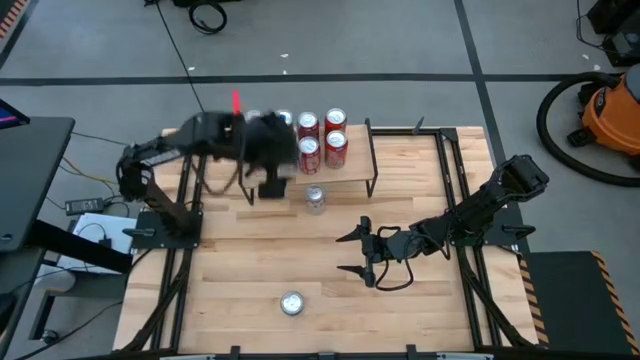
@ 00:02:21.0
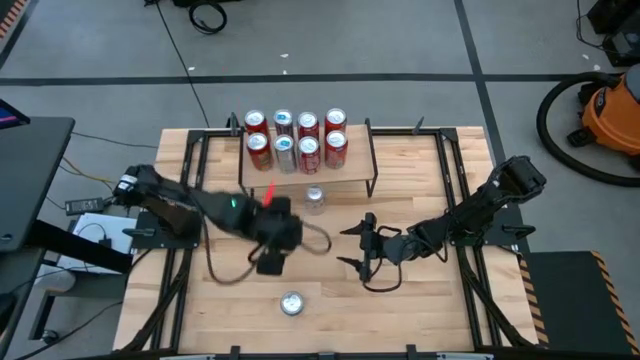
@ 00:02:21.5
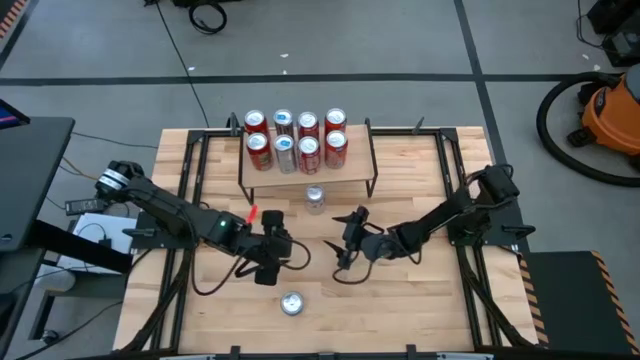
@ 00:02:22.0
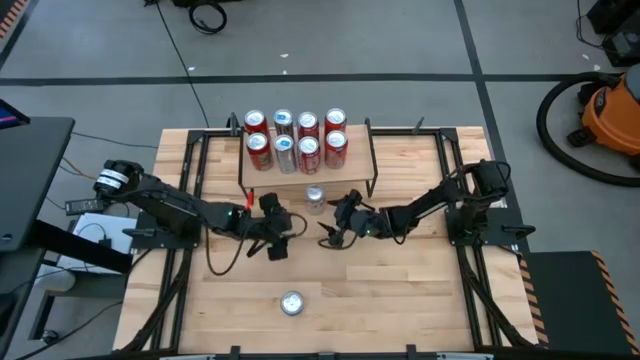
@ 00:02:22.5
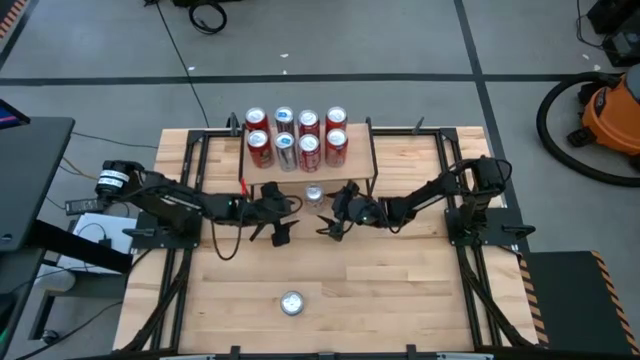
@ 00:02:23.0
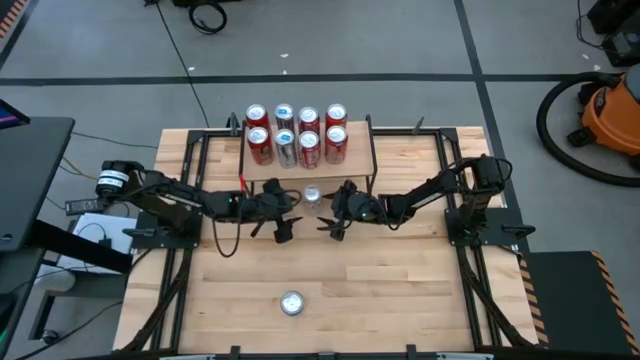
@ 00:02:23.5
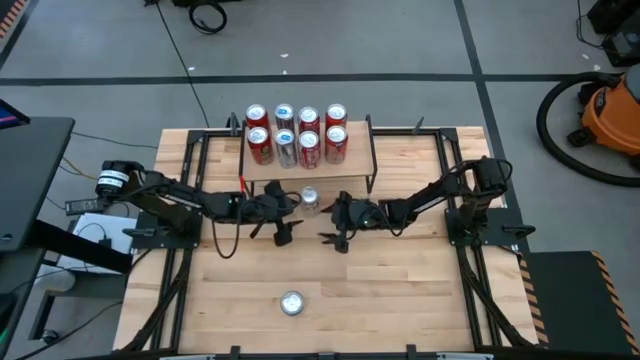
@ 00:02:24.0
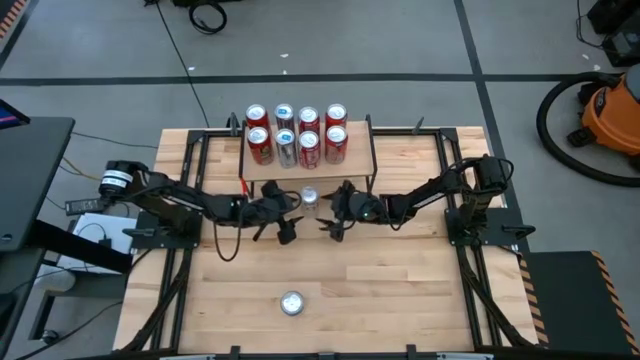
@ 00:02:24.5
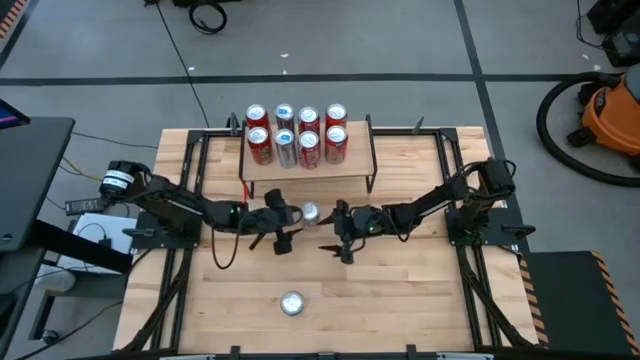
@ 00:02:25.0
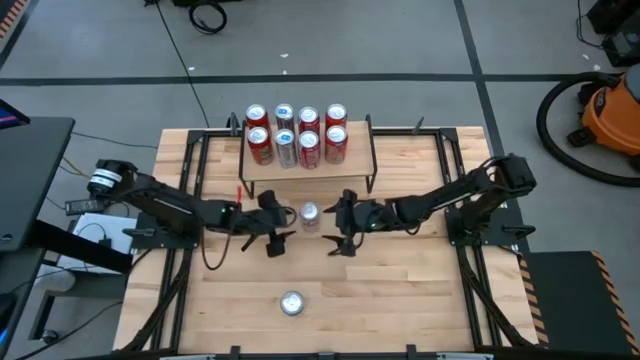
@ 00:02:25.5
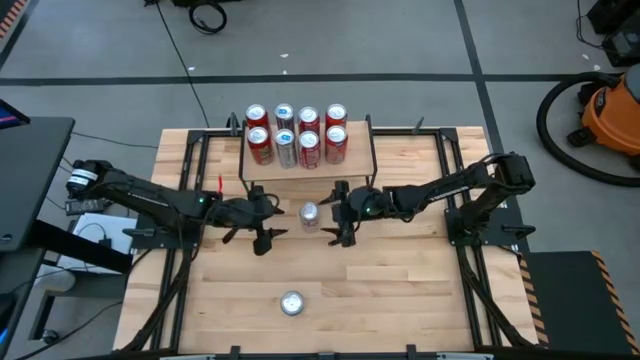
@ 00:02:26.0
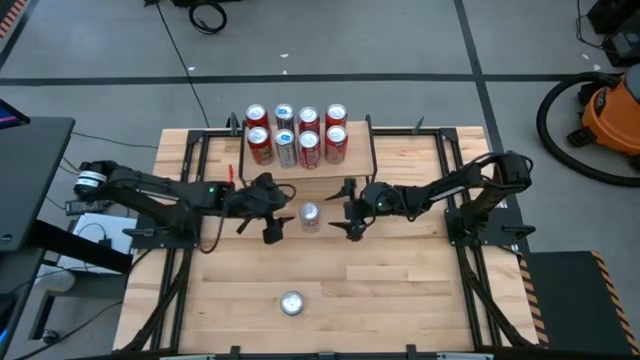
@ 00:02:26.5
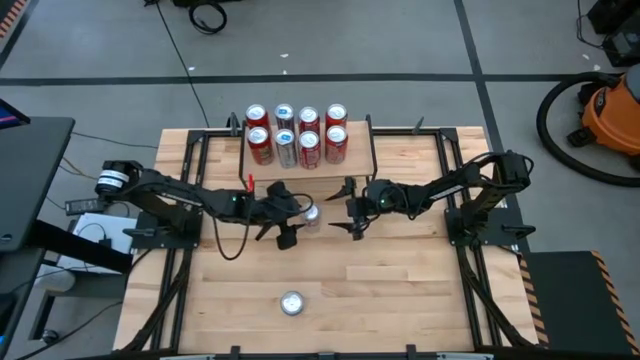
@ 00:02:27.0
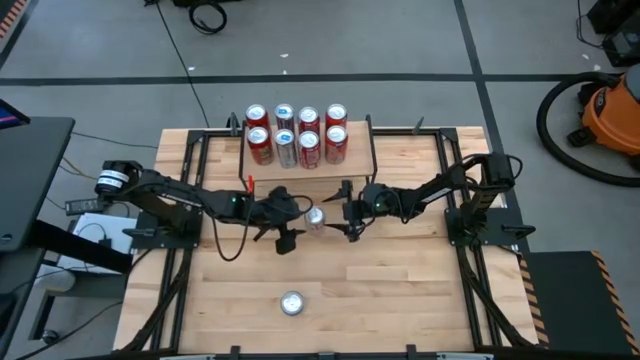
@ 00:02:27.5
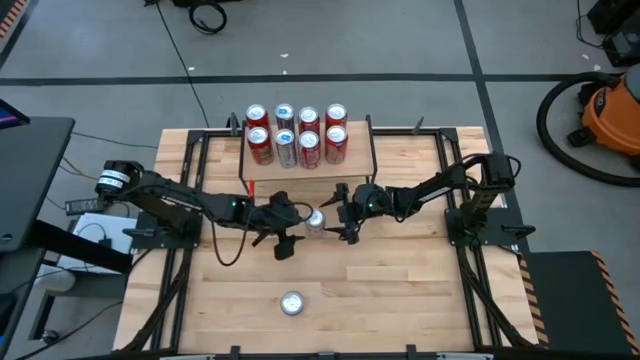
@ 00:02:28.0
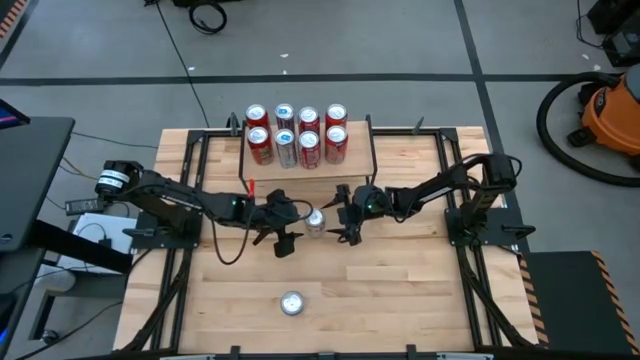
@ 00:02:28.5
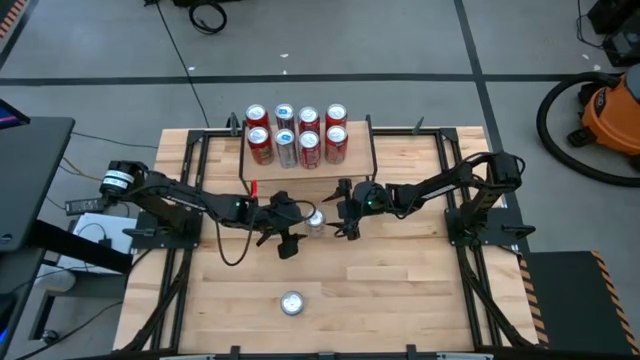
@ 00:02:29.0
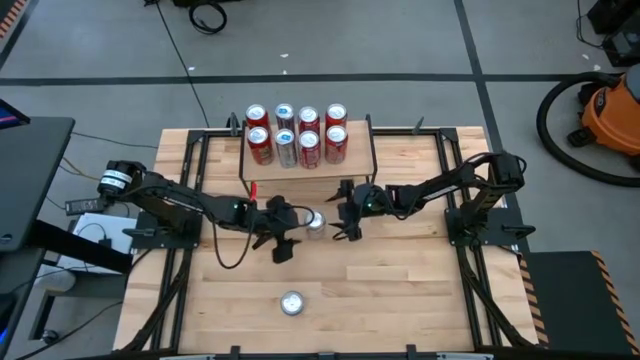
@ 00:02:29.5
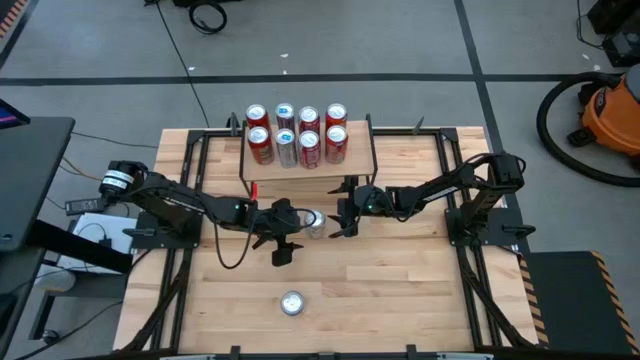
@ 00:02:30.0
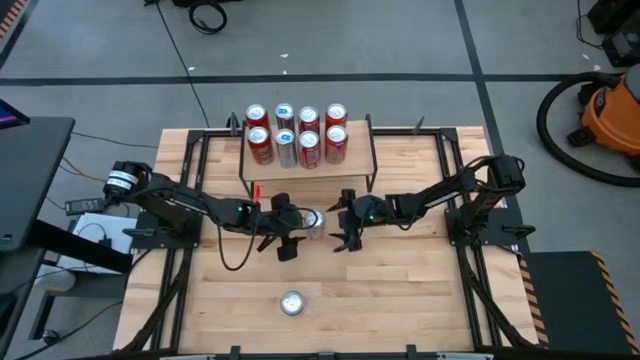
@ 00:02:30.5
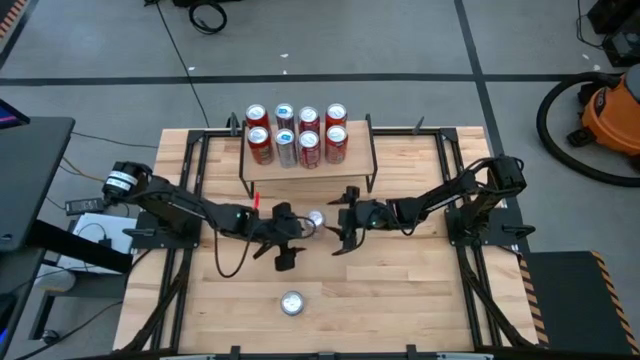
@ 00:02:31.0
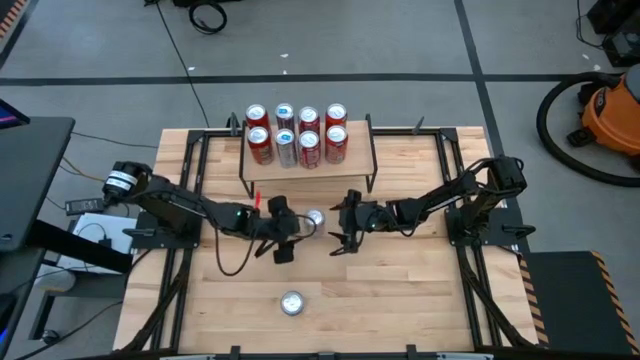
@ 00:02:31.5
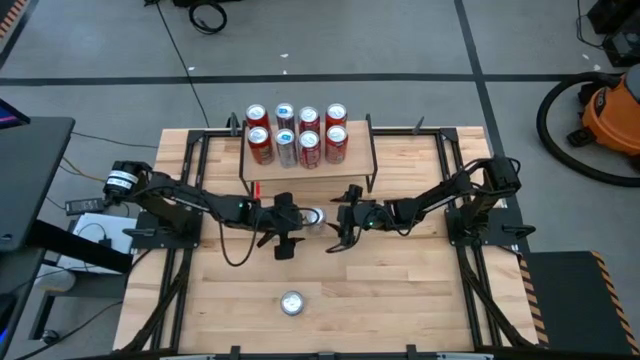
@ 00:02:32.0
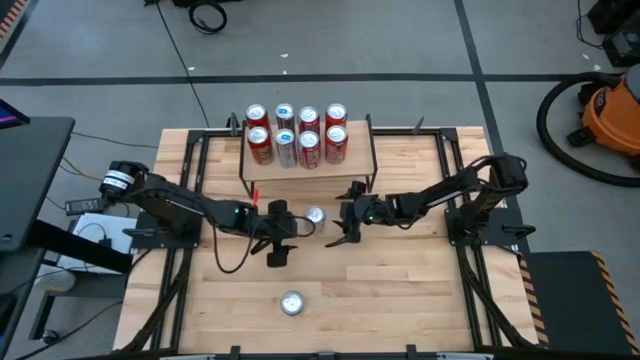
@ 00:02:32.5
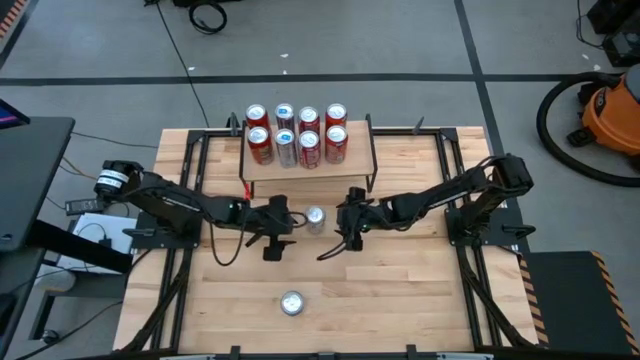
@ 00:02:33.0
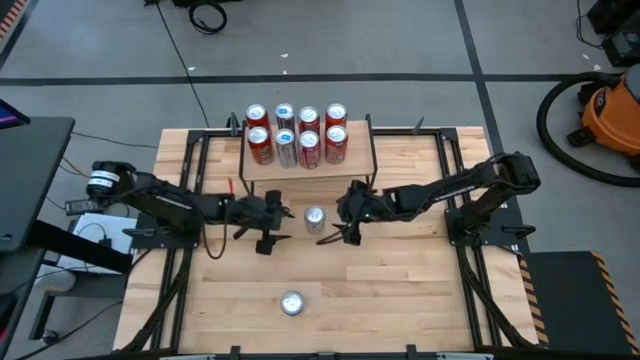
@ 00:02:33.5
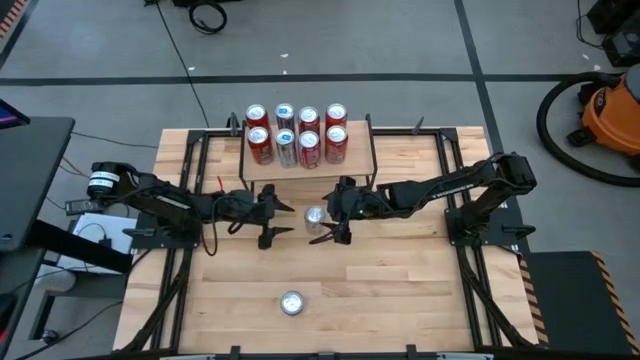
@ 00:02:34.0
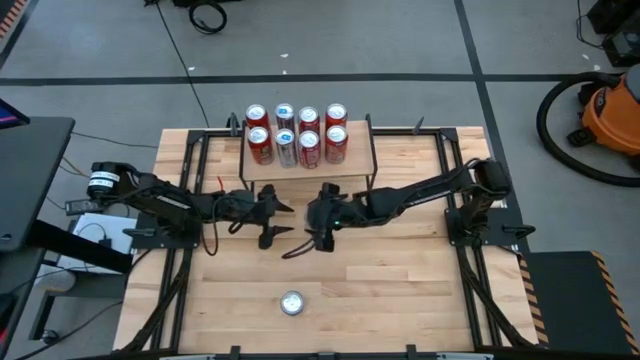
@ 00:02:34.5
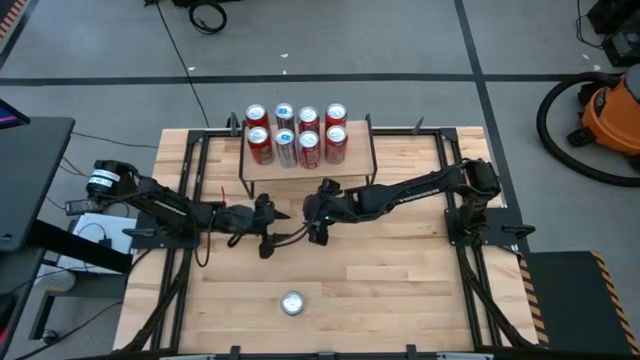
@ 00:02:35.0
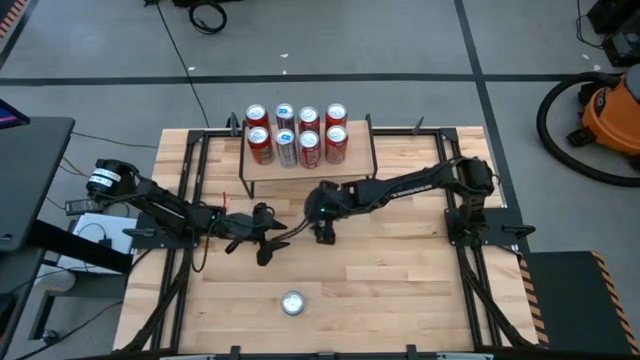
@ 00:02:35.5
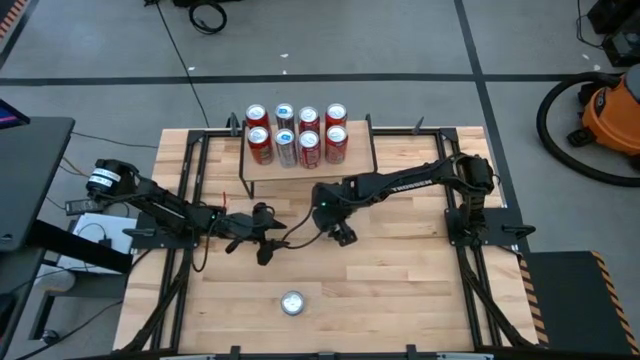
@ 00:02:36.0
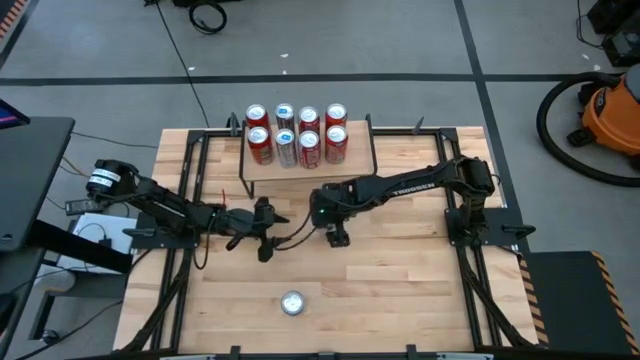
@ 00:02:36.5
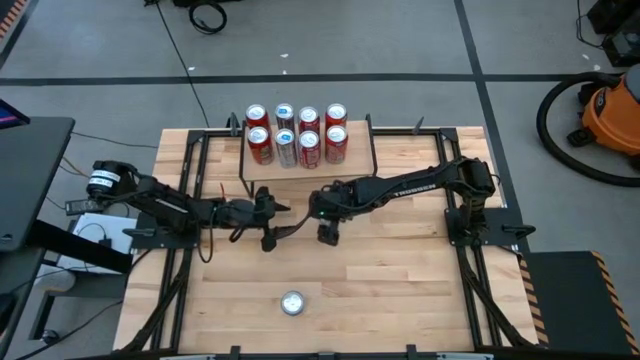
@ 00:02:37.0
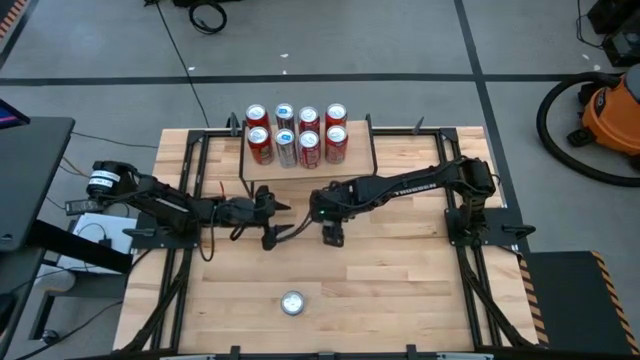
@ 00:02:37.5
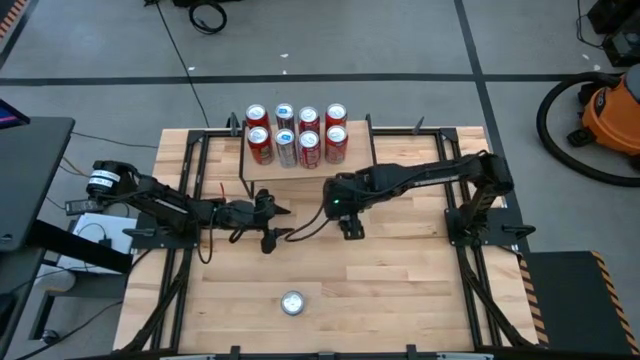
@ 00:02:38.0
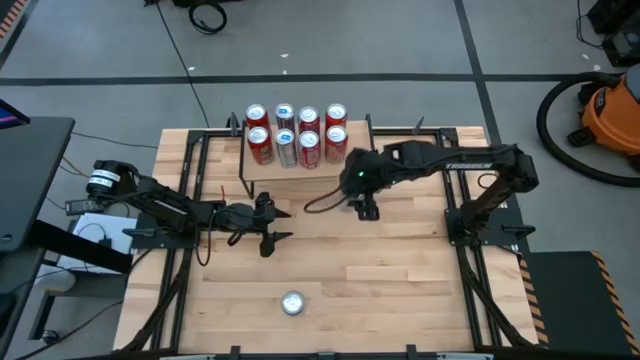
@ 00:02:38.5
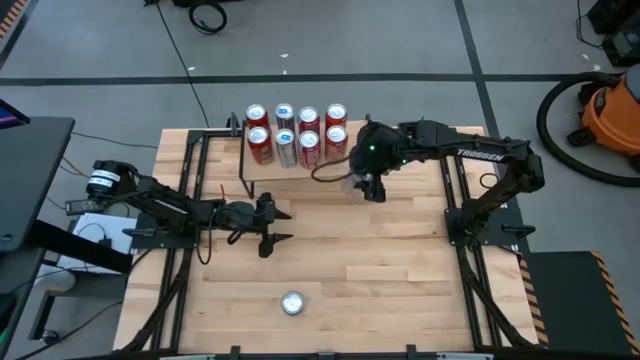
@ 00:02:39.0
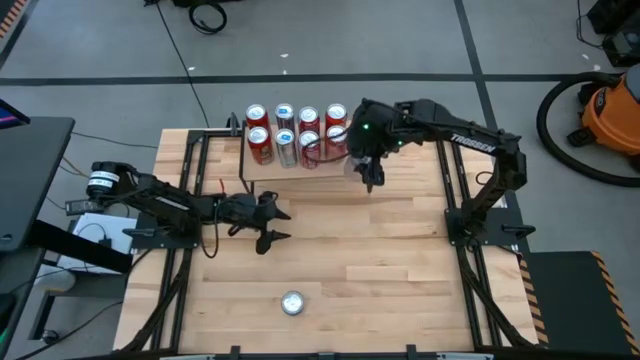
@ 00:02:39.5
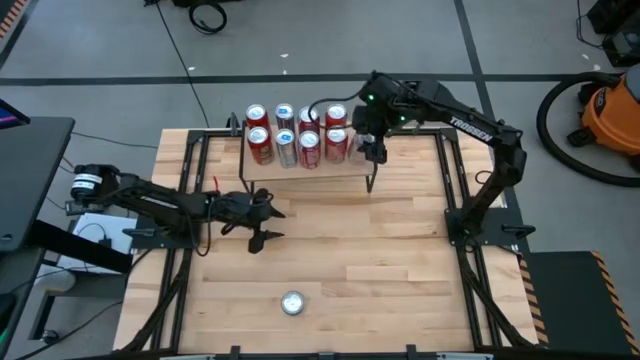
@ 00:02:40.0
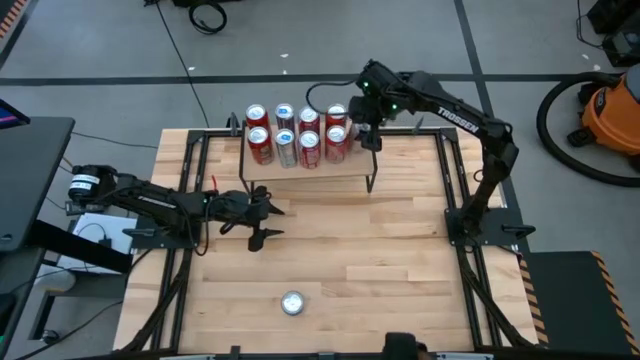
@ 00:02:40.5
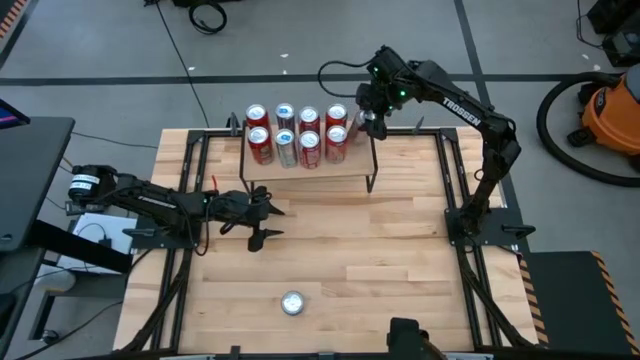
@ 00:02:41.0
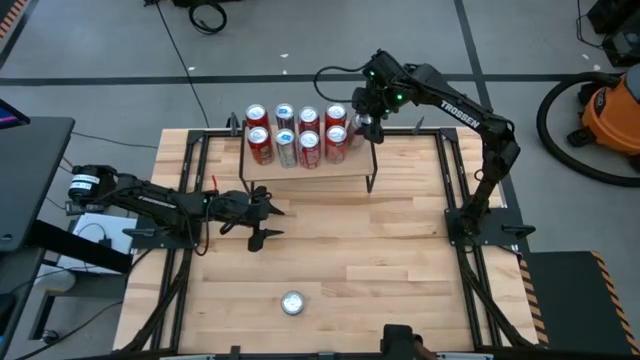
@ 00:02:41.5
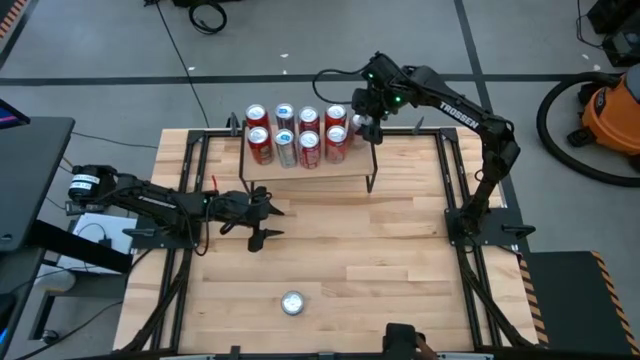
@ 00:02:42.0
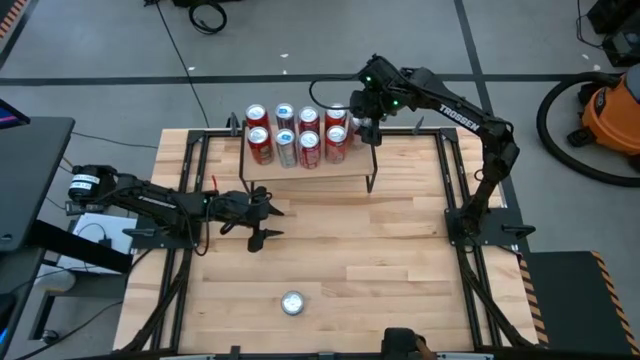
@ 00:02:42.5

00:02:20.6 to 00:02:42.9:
Task: Place canned beverage on shelf
Put the red silver soda can on the shelf
